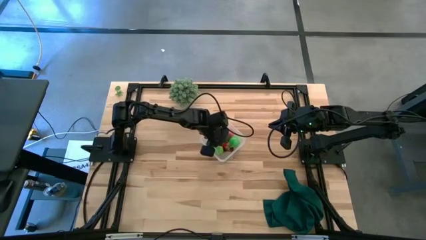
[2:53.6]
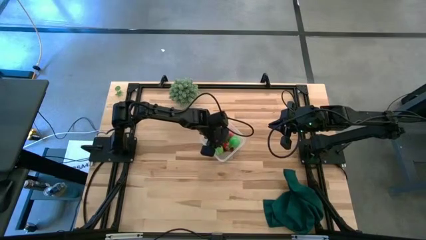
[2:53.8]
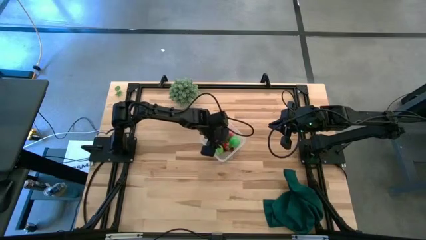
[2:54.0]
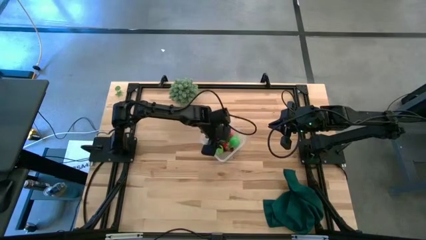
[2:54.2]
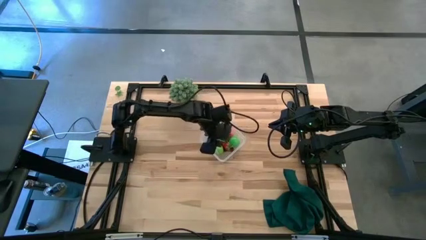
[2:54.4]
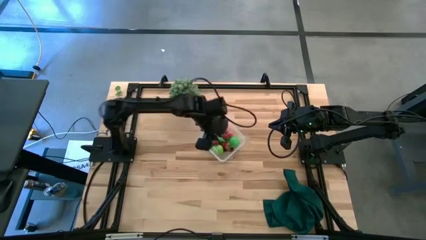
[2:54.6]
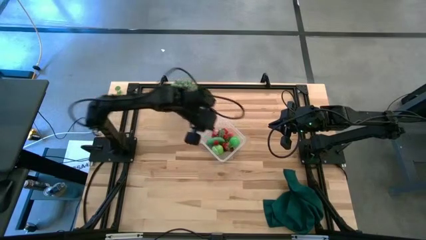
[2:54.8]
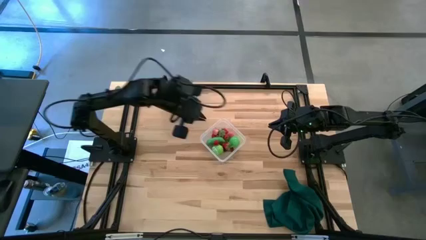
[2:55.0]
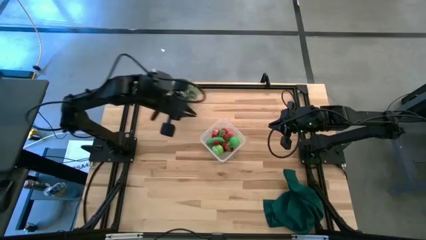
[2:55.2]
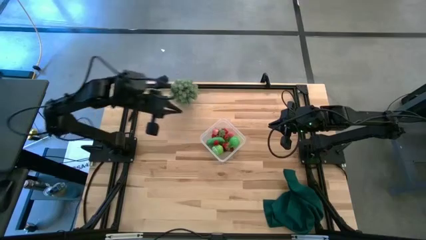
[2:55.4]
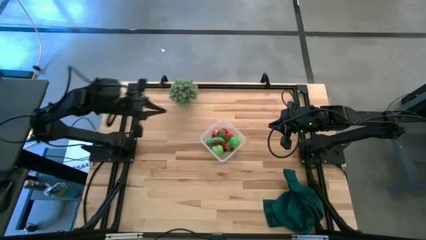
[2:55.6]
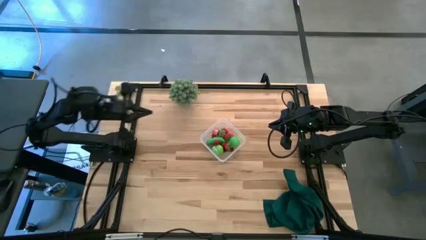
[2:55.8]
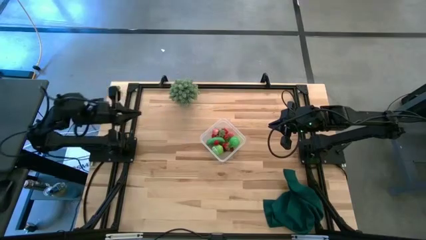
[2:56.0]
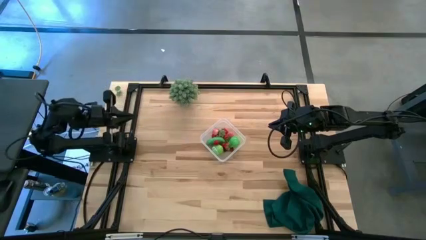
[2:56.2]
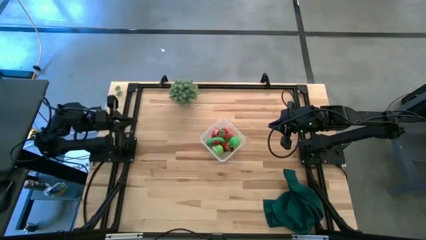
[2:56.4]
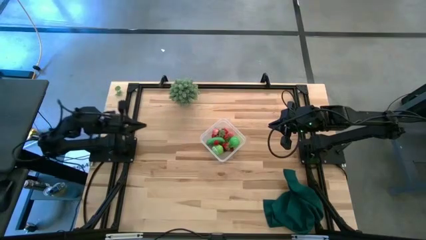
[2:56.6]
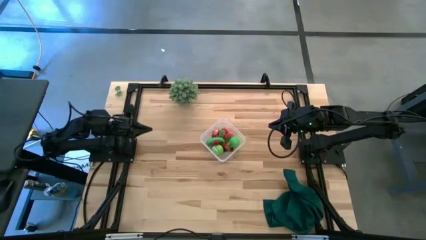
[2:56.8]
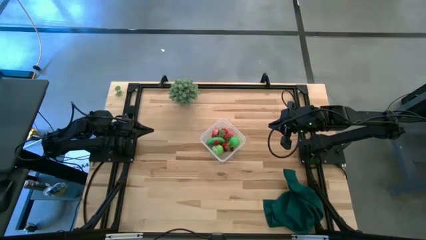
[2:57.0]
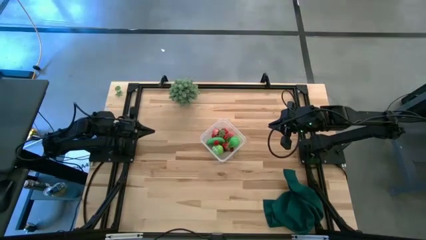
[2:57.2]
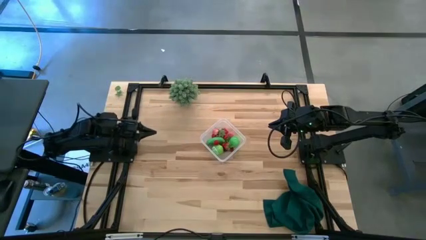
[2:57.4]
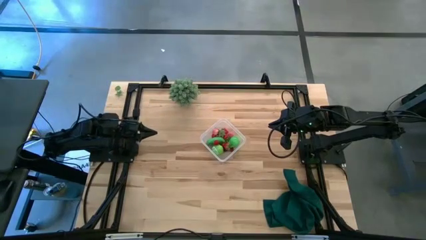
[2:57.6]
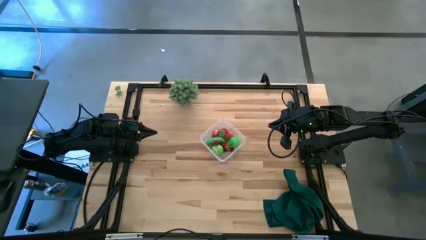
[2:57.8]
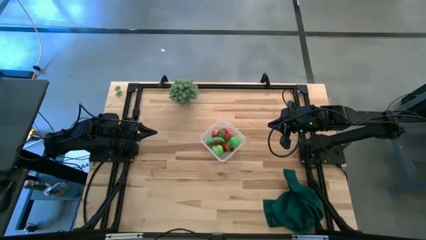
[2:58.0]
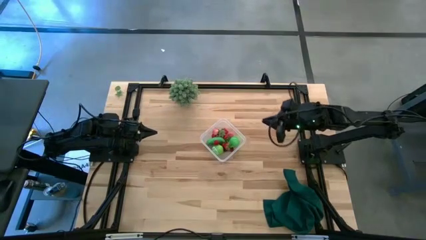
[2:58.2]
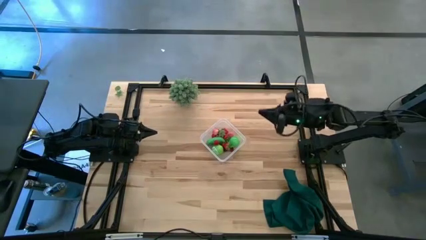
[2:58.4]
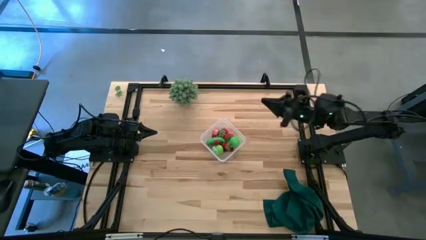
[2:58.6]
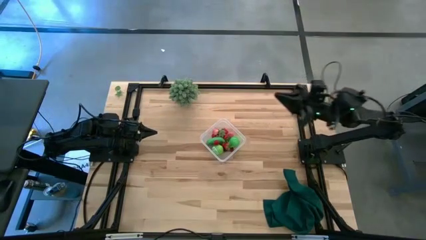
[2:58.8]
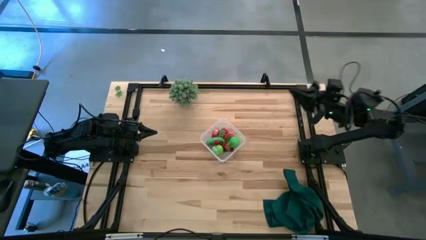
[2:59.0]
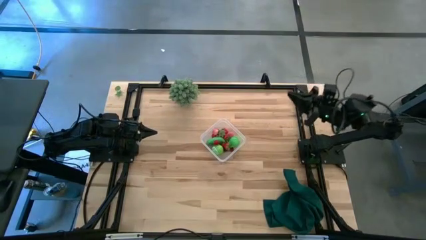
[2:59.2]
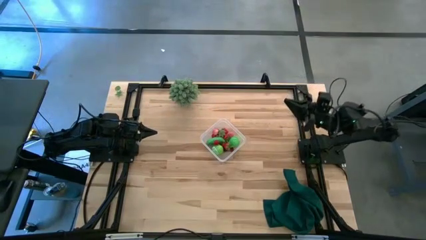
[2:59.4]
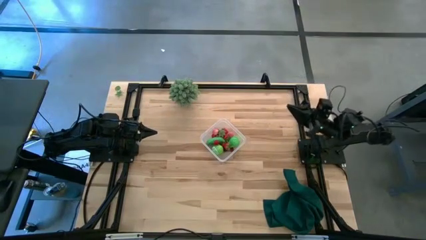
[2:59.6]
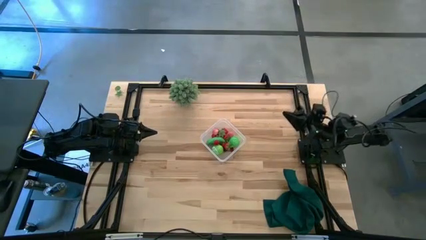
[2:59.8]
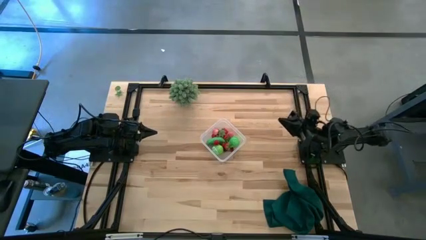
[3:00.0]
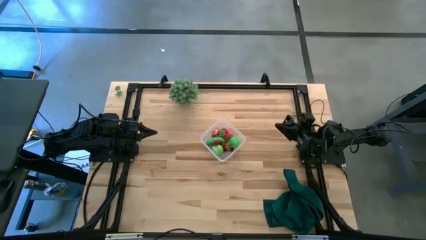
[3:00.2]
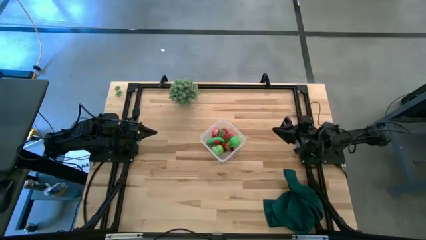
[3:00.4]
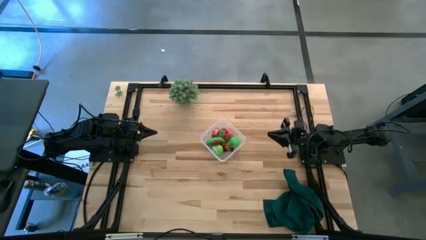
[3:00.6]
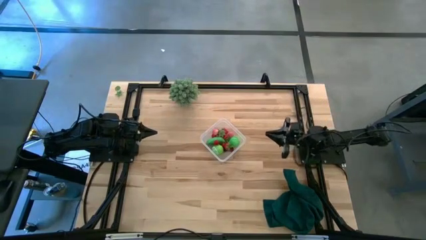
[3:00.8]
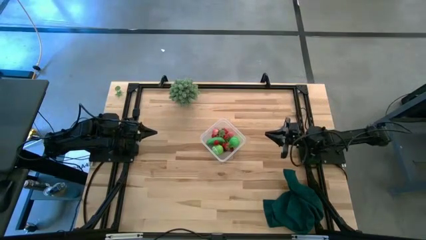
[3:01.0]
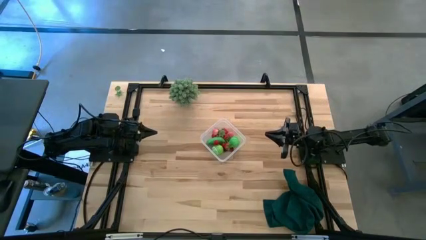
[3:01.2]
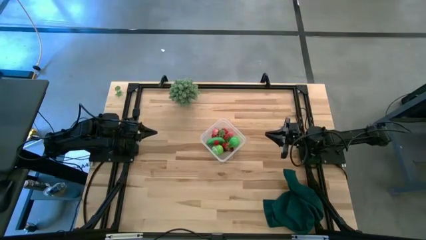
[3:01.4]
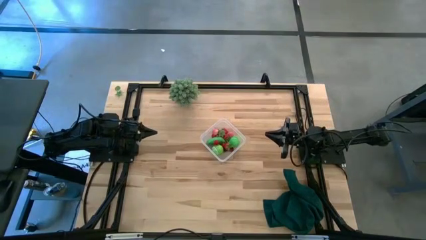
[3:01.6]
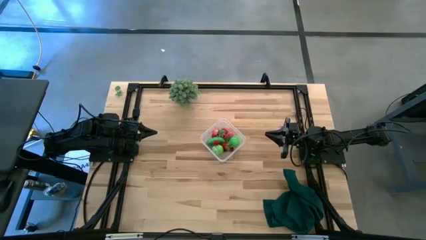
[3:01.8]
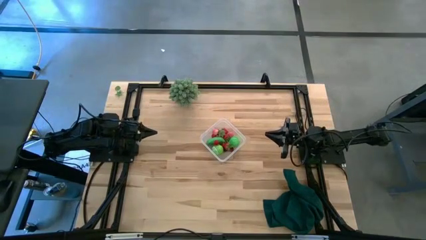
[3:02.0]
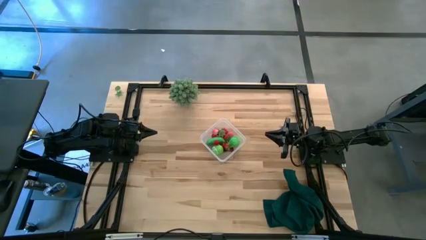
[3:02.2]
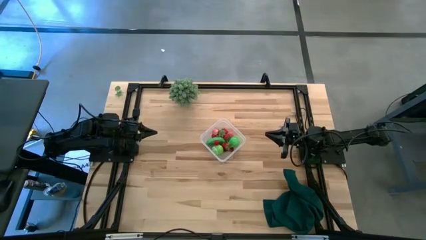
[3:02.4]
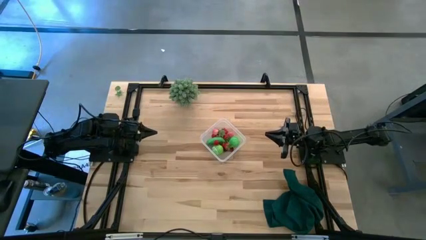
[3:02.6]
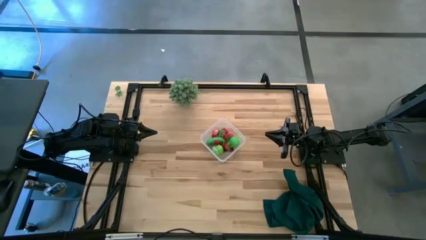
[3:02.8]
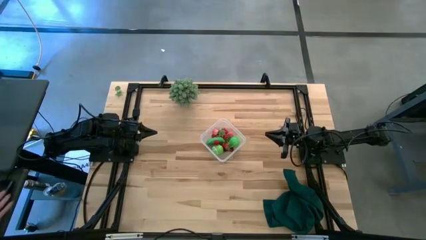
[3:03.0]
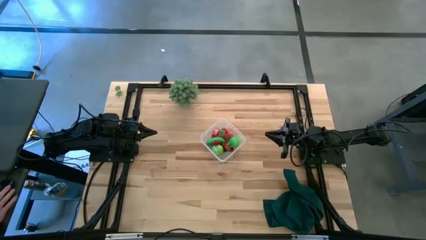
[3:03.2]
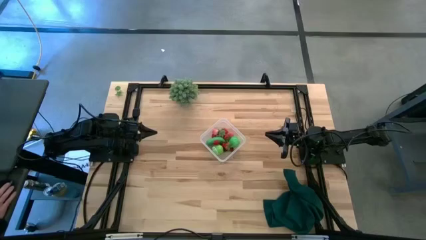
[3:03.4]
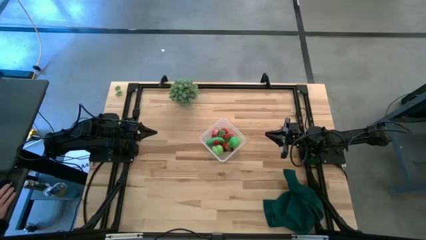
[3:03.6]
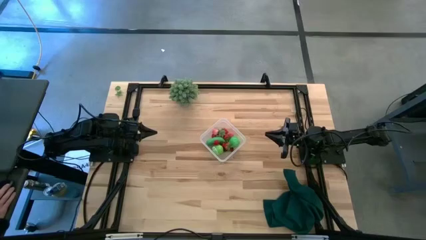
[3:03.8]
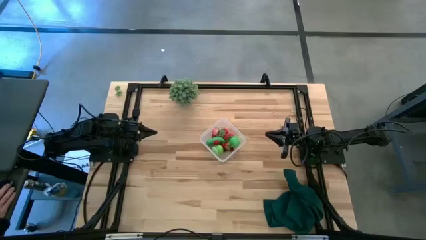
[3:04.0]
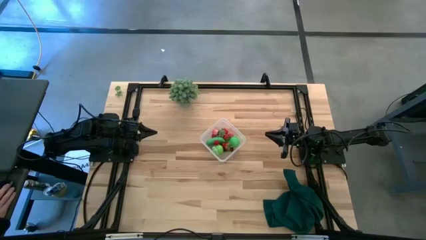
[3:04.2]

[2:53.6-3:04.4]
Task: Pick and placing Produce into tupperware
Return to Home Position

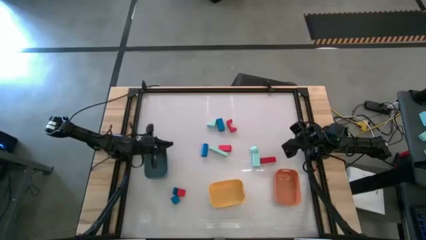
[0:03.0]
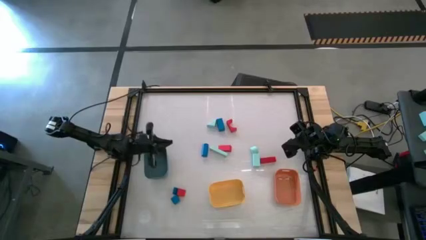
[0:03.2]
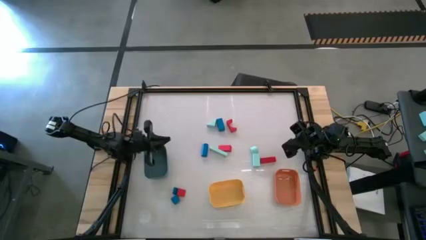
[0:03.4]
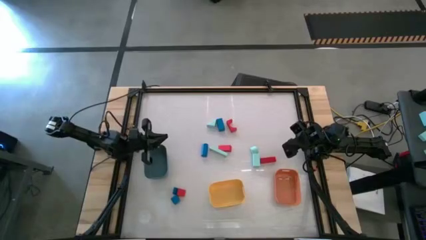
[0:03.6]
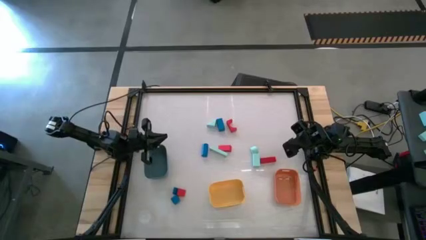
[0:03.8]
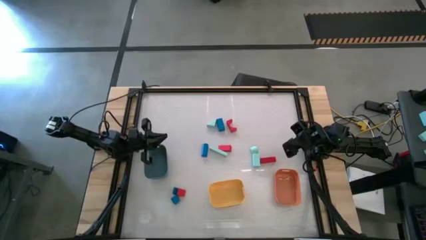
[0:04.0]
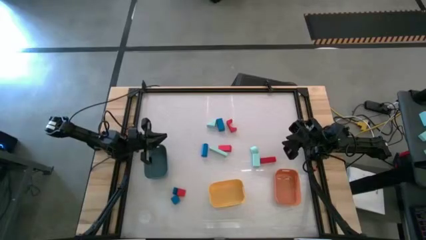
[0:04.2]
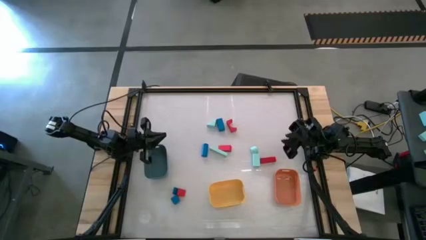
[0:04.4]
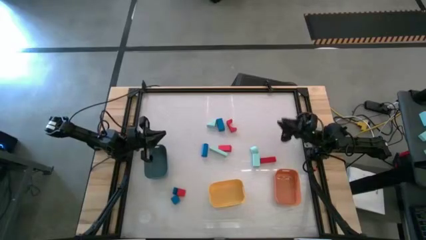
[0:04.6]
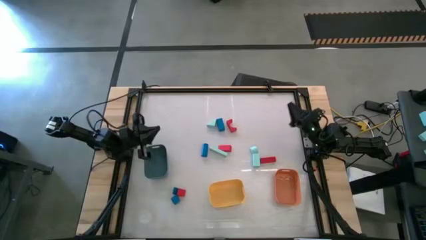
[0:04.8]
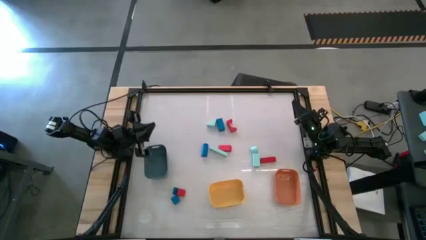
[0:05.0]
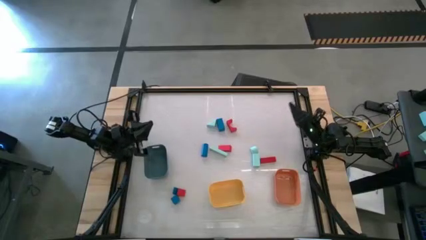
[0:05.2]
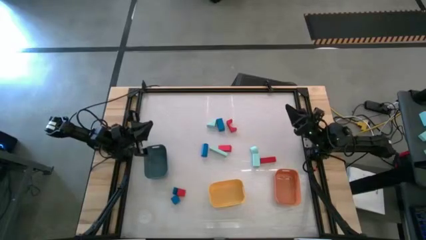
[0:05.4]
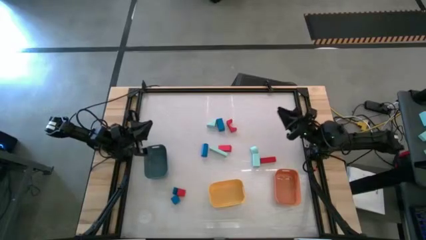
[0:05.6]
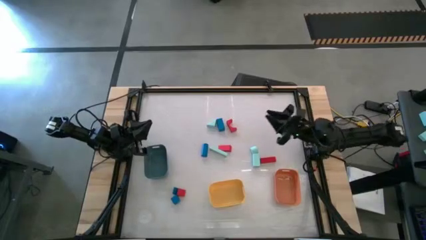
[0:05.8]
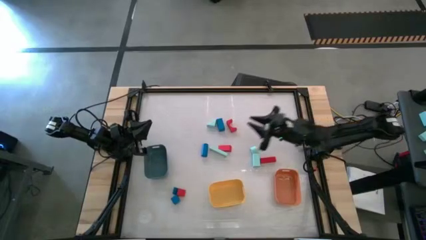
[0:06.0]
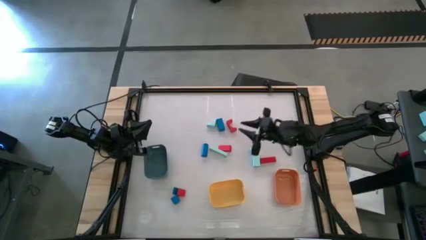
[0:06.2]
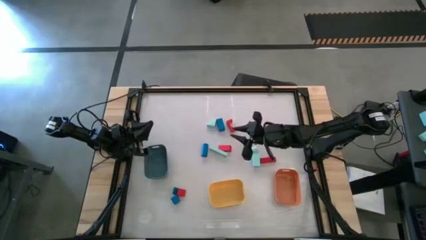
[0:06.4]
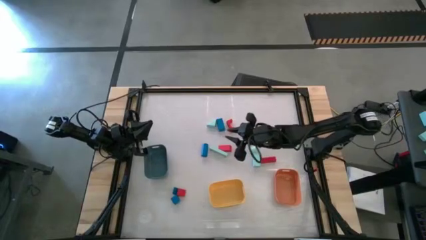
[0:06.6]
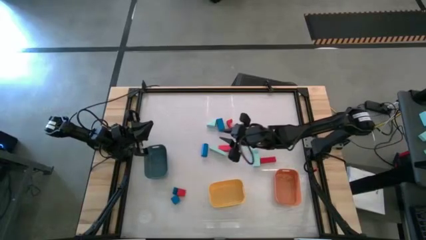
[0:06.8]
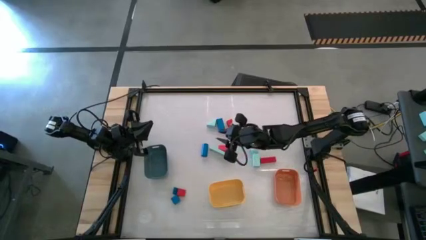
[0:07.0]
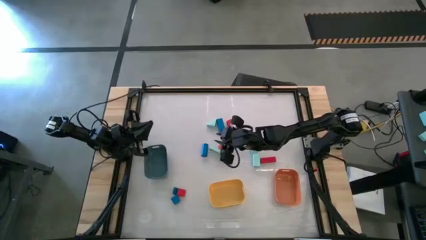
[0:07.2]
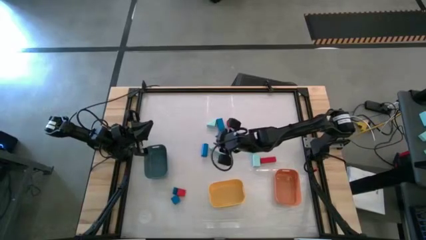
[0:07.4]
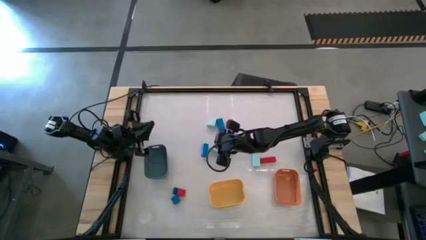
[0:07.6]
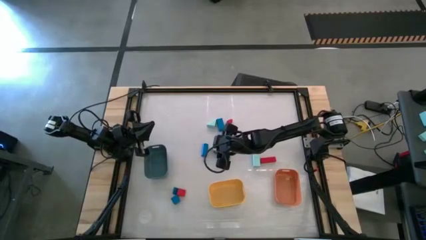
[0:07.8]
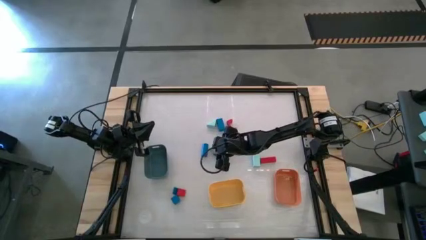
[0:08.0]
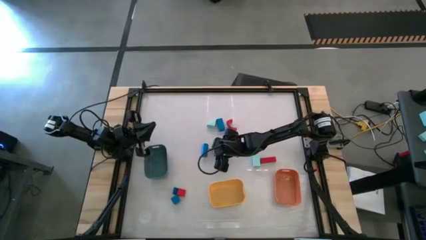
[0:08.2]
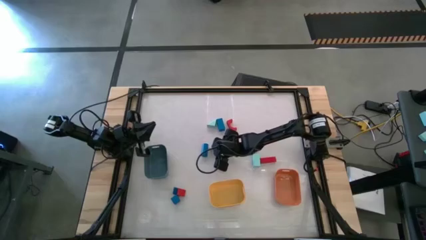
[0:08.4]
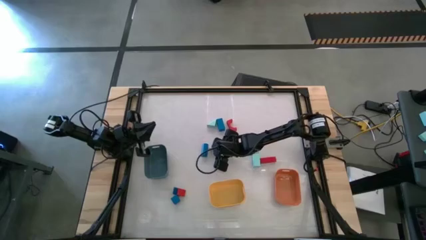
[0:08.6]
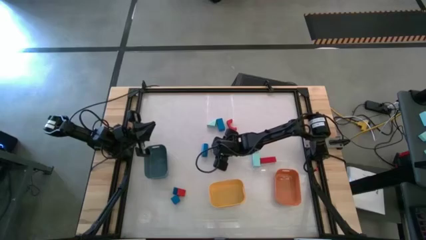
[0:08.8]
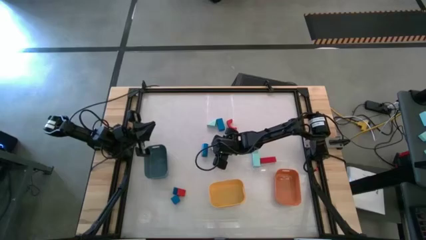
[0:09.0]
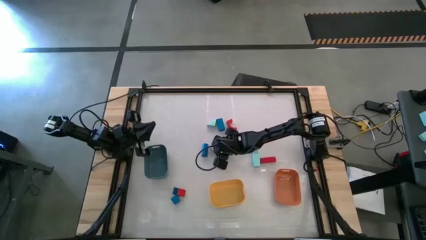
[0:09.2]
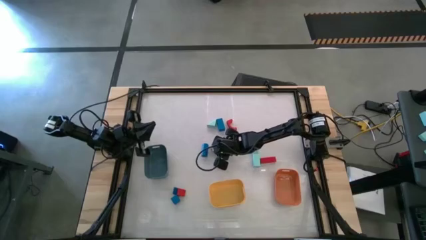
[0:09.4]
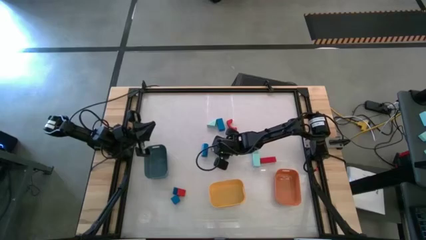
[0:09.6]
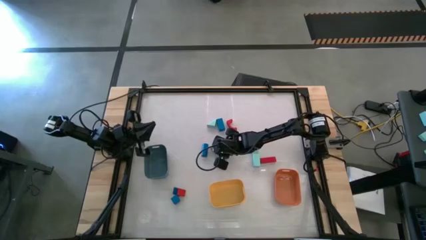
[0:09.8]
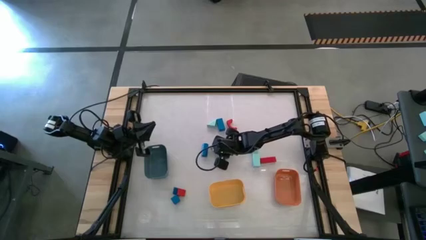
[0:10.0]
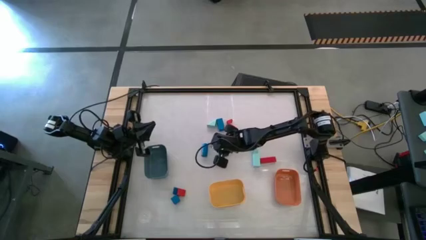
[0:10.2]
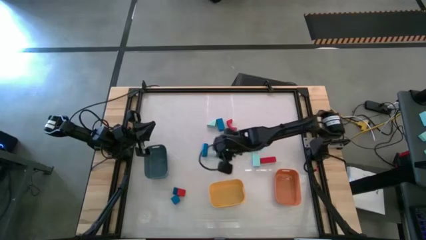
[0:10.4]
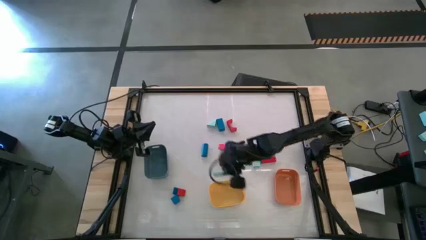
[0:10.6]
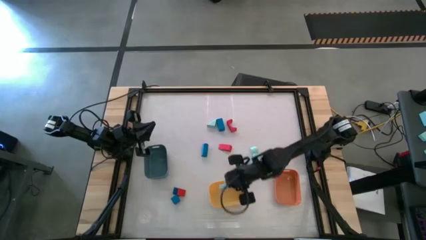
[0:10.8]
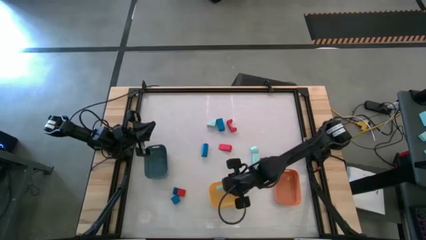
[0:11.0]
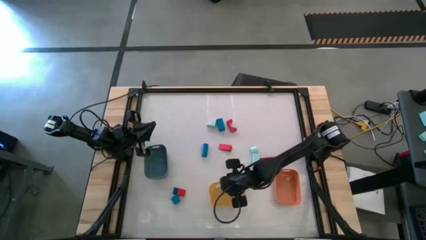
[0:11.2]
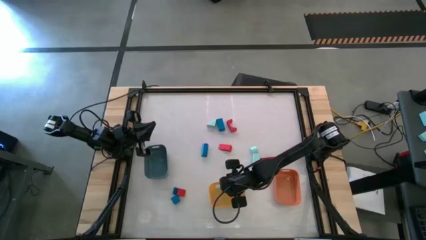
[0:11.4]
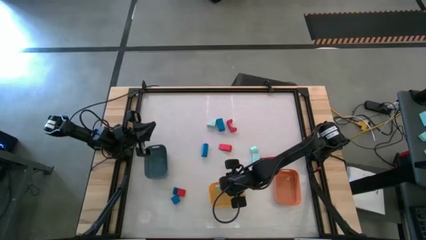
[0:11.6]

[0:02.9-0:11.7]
Task: Sort & place blocks by color
Put the light blue block into the yellow bin
